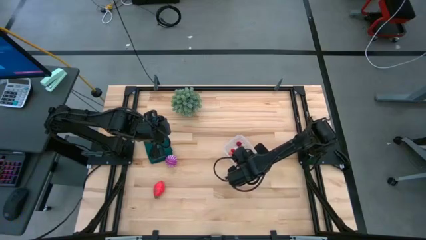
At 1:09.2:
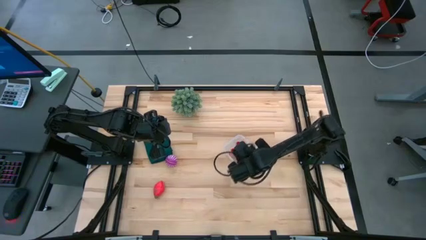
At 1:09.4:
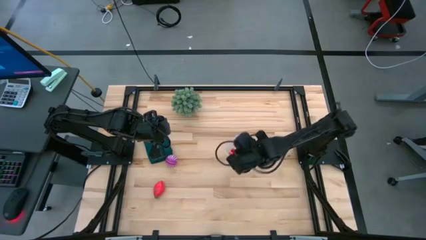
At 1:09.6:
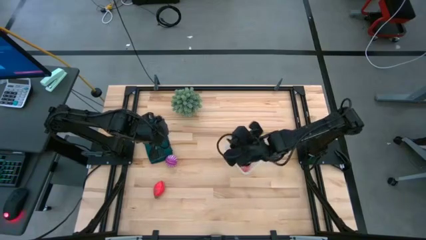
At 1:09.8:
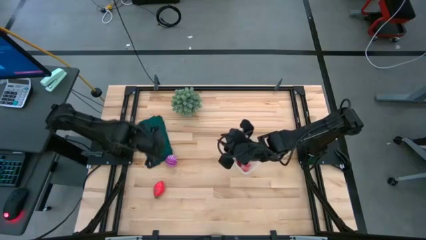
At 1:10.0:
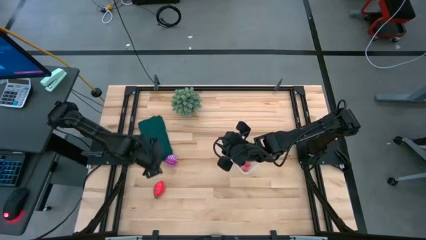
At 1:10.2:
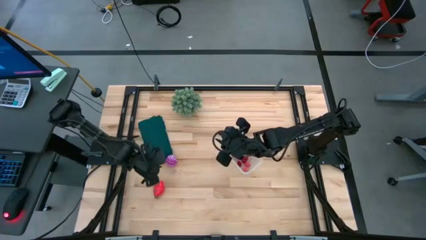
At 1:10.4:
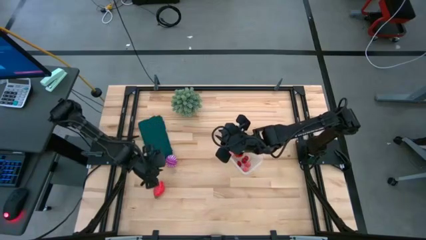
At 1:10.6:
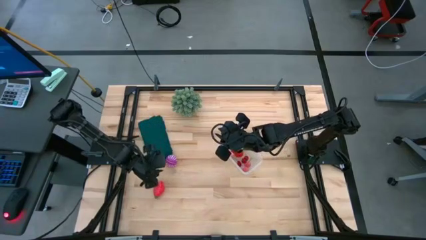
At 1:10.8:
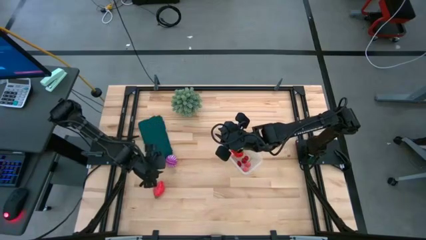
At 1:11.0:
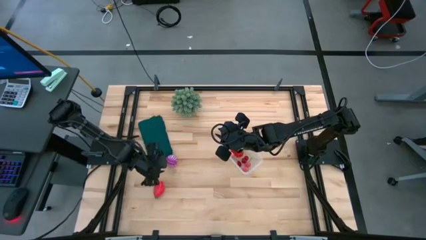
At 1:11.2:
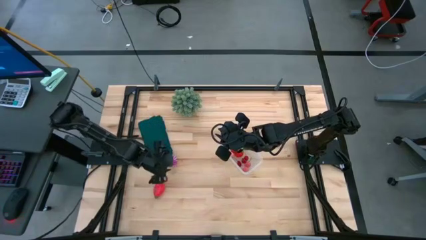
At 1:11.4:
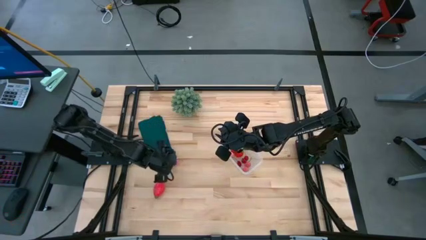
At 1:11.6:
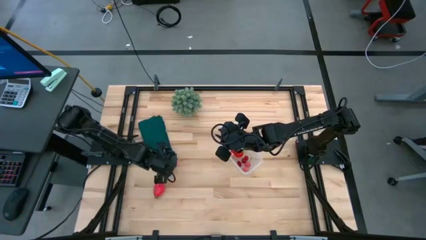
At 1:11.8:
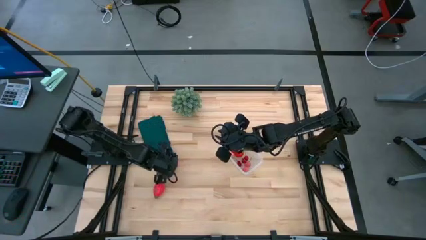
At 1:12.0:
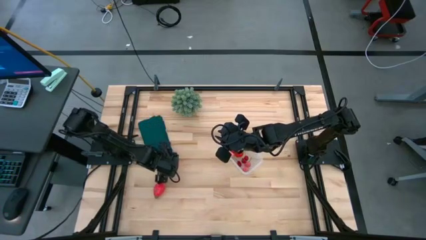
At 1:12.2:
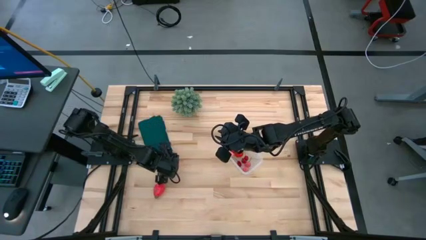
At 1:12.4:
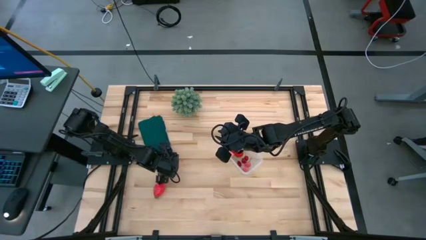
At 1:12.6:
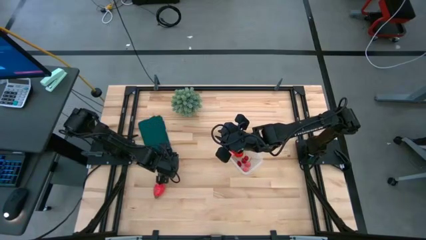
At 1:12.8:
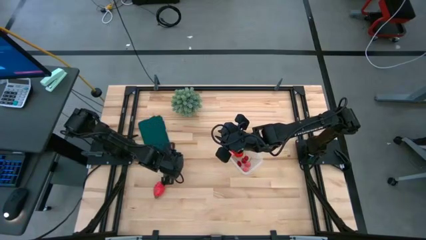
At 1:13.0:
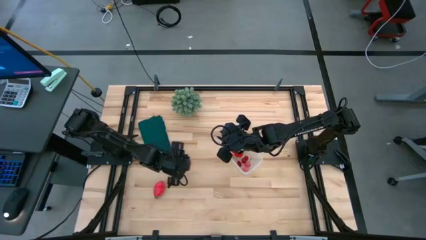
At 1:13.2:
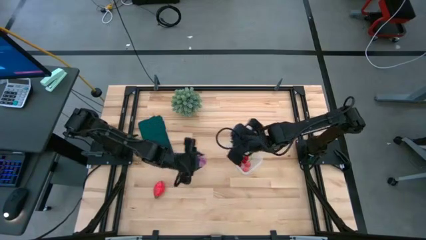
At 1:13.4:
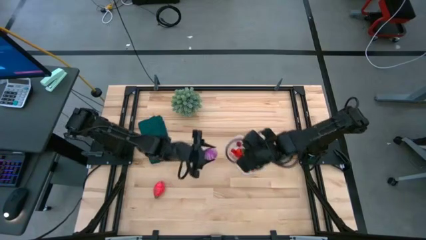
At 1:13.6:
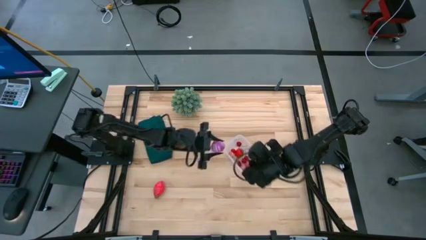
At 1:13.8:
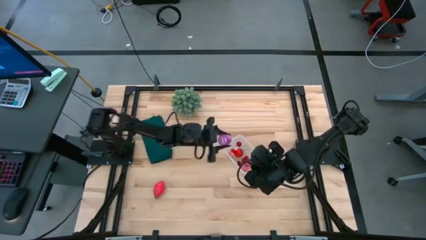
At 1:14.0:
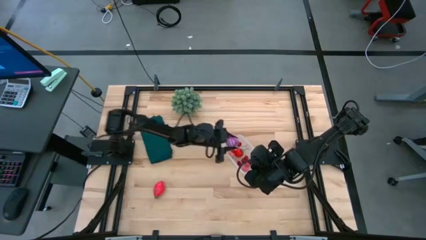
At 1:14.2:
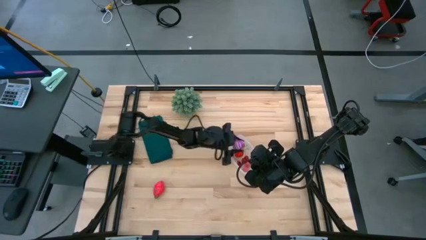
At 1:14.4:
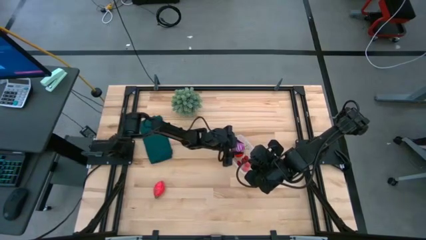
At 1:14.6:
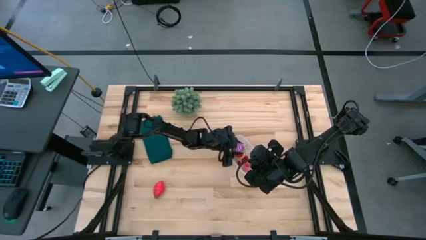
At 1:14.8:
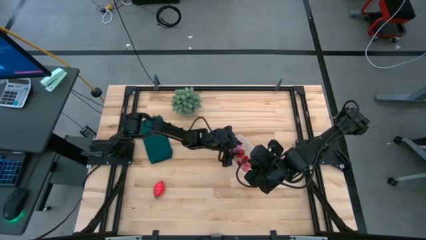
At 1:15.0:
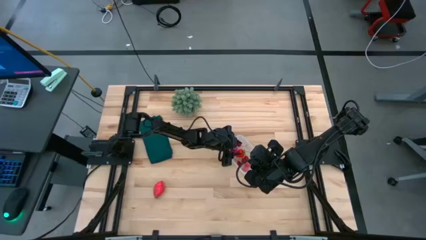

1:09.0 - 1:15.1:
Task: Pick and placing Produce into tupperware
Put the onion into the transparent bin

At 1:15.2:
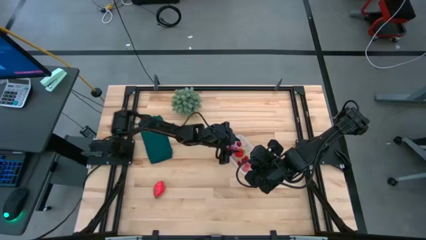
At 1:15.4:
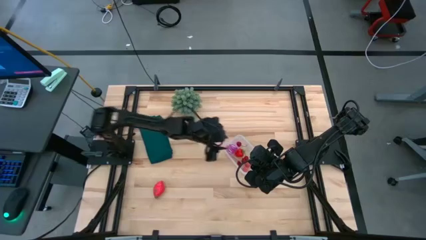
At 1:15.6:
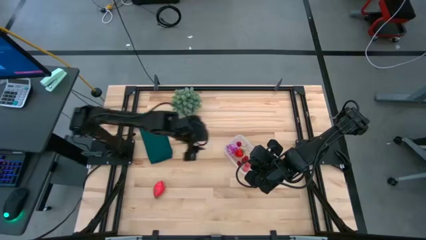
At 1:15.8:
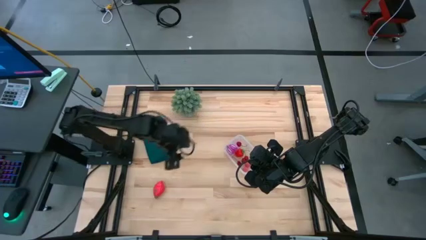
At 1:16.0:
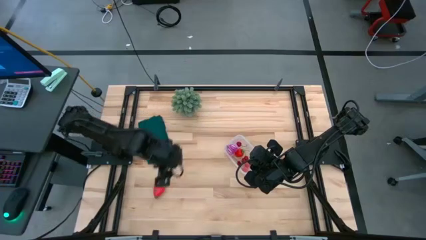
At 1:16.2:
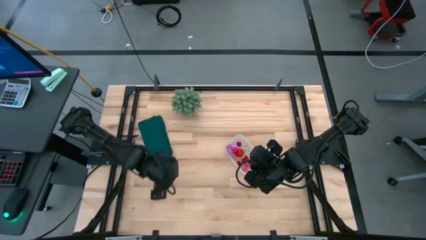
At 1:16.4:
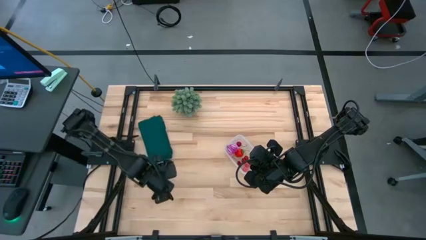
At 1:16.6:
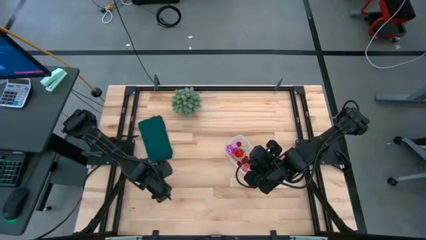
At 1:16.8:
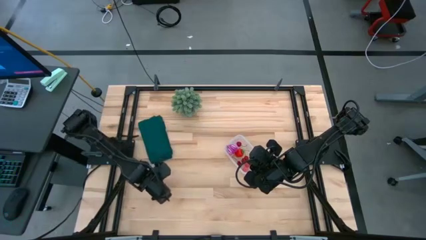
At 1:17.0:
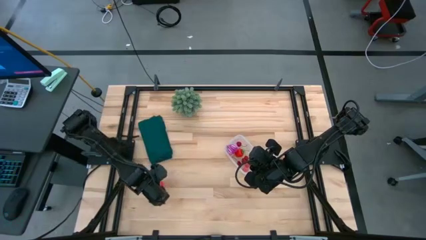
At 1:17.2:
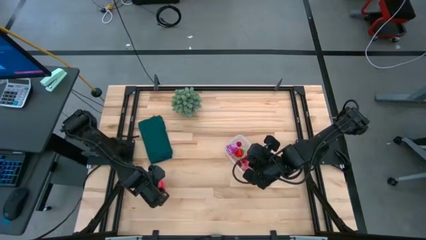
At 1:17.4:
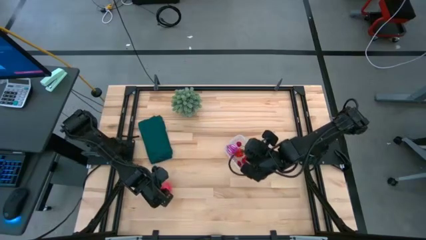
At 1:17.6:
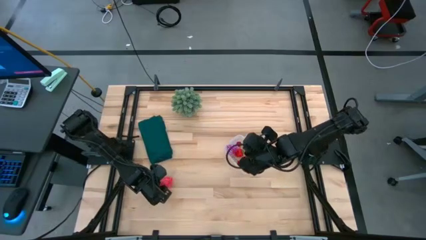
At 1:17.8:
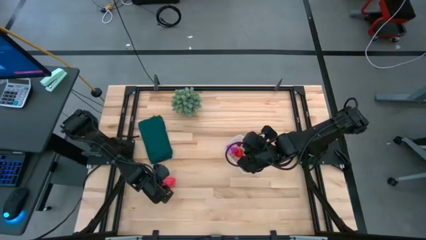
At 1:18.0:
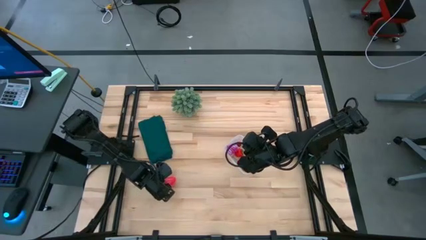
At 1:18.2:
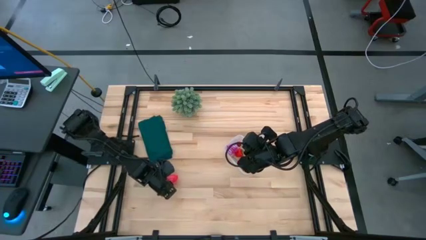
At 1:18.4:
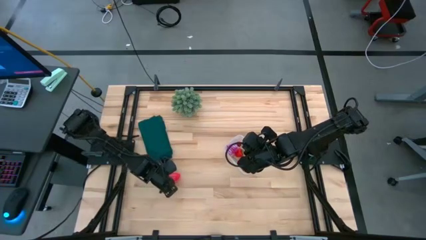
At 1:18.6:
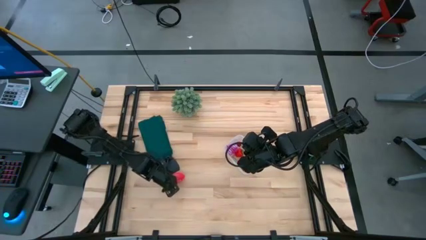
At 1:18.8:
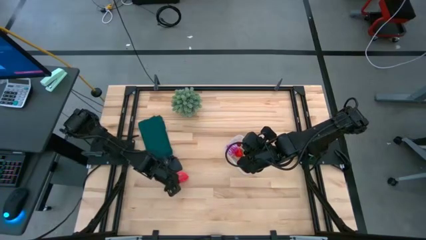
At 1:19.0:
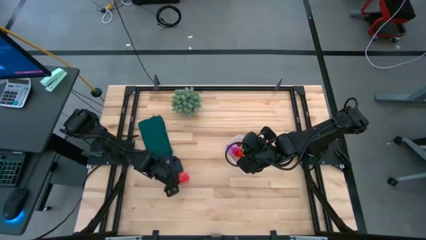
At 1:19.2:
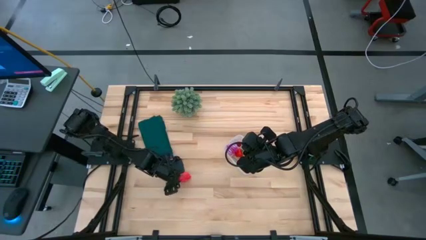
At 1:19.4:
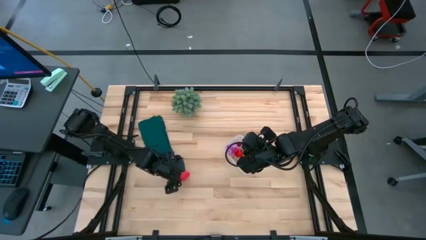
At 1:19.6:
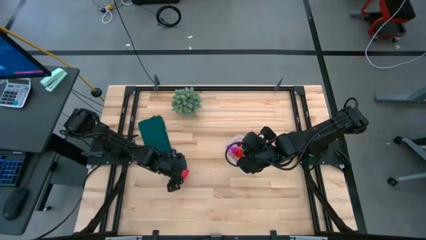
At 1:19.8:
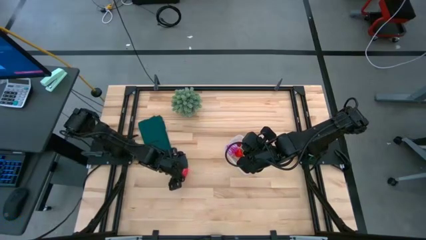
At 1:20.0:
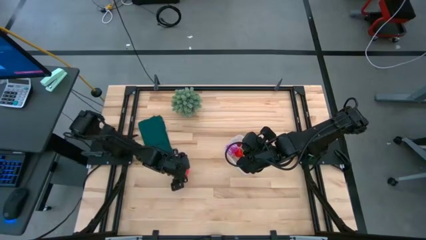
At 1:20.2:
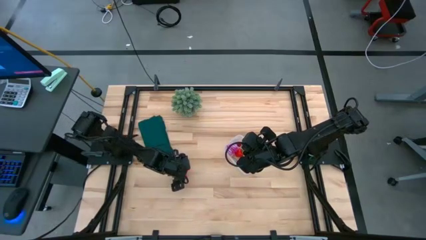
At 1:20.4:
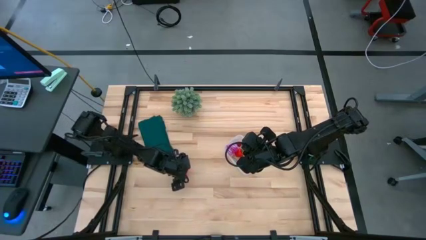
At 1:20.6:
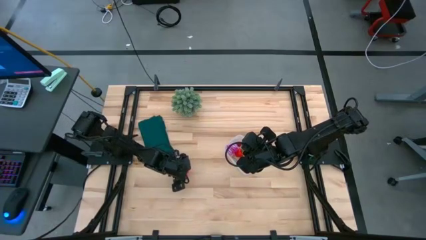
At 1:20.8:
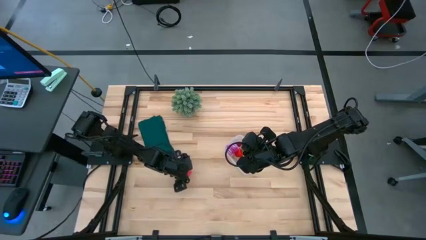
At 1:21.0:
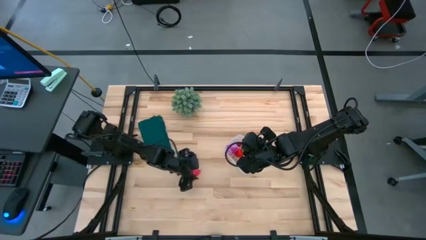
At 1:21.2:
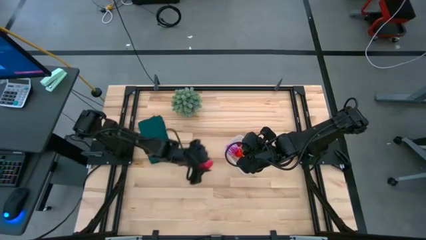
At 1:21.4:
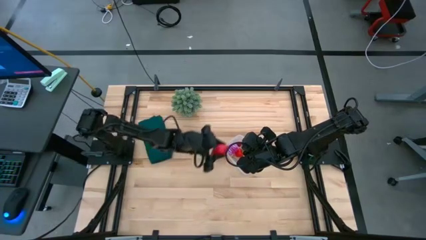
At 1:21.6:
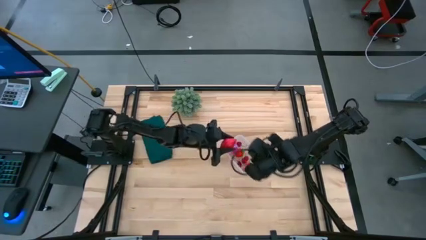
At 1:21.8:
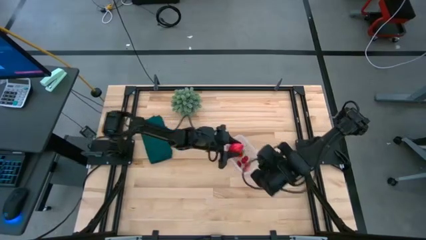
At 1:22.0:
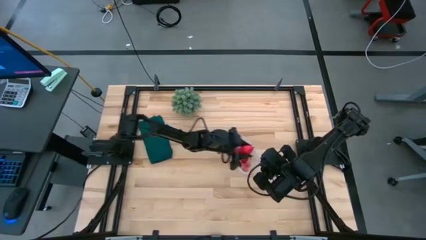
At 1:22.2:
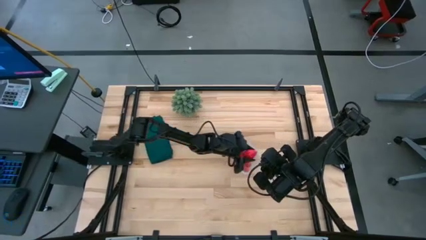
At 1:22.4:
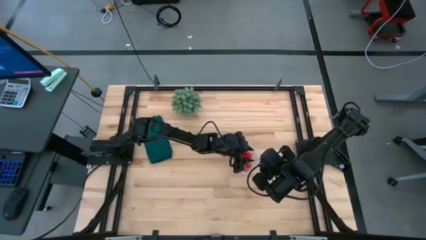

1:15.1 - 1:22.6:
Put the dragon fruit into the container

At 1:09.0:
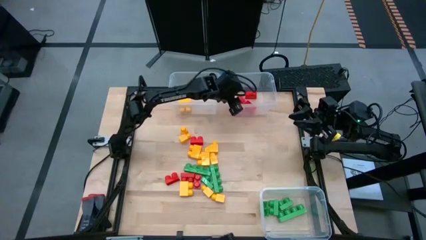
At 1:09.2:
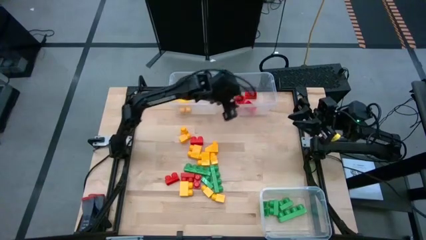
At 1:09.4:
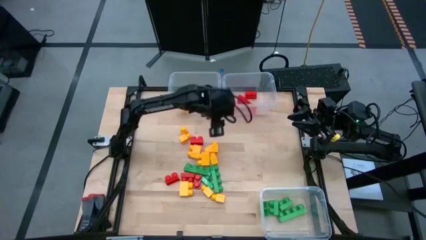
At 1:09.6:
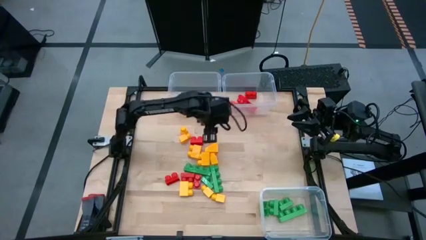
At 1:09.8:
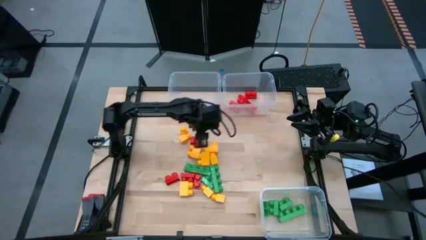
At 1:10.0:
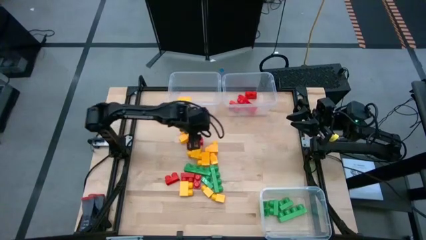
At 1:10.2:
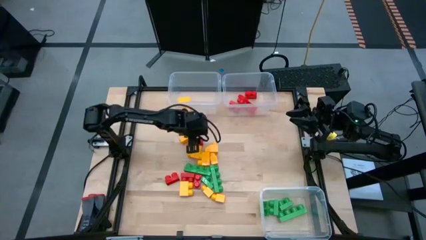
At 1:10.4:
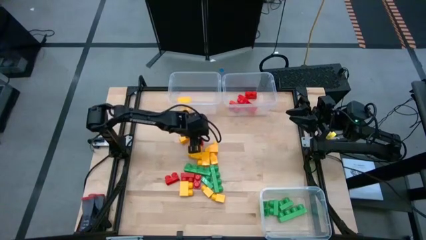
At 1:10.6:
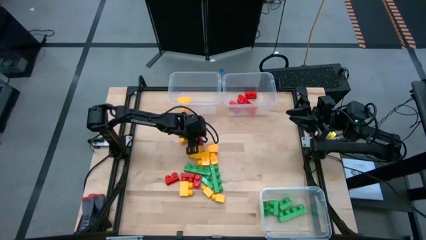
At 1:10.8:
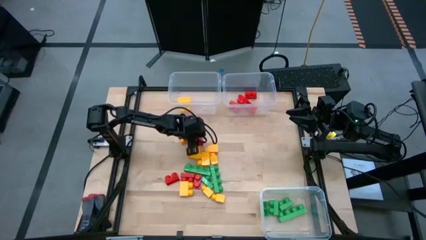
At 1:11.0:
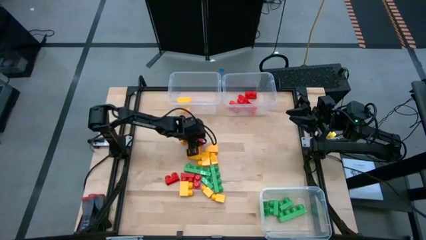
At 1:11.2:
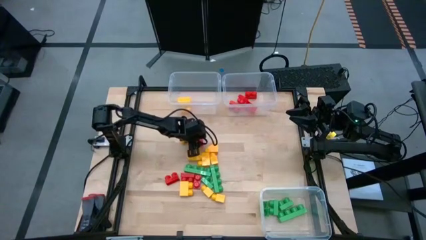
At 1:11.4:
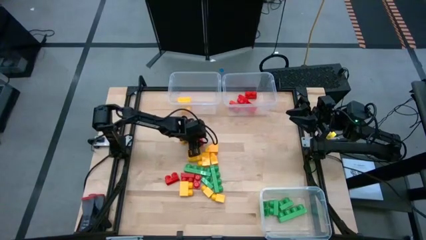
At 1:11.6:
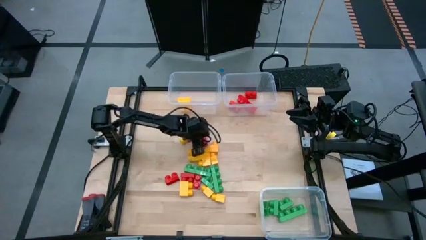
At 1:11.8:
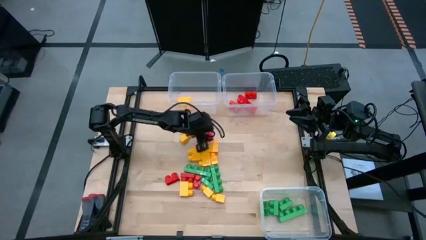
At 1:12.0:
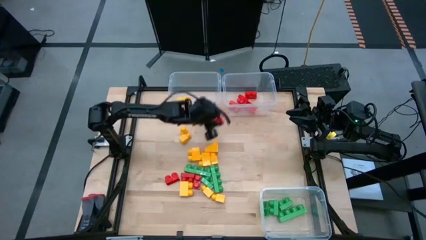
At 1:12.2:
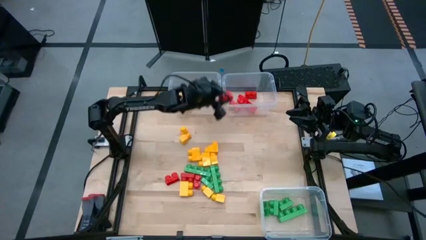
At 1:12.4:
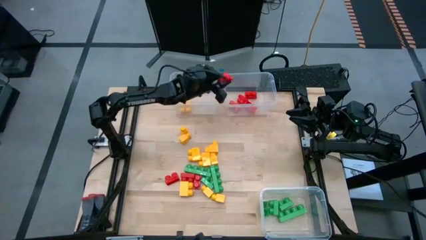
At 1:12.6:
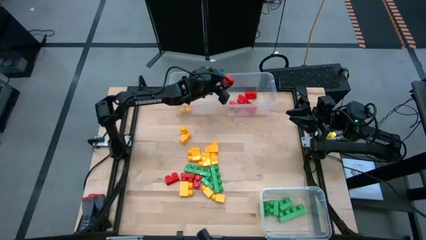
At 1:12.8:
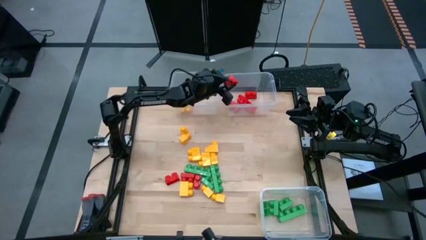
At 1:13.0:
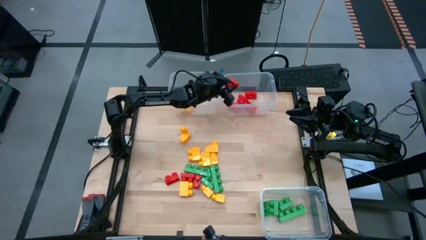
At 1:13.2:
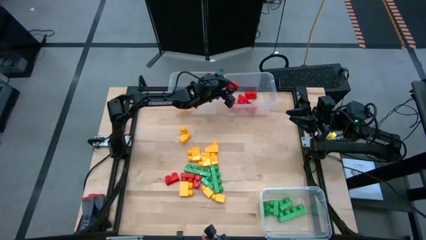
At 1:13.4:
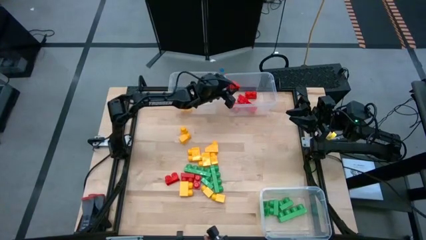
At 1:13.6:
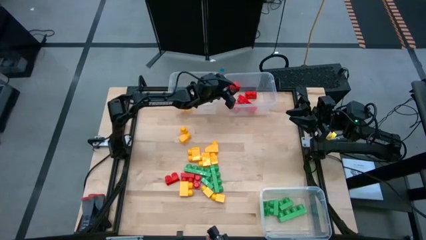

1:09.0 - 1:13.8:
Task: Sort blocks
Put the red piece into the top right transparent bin
